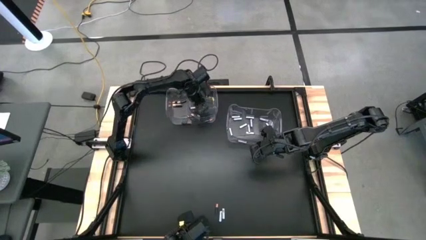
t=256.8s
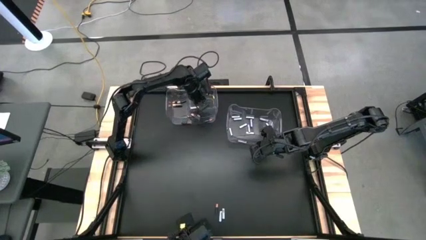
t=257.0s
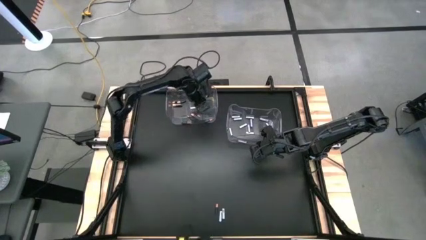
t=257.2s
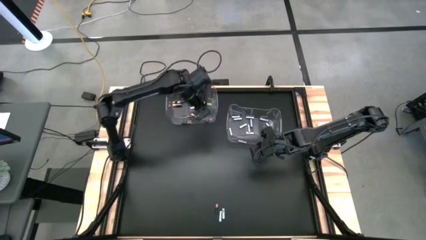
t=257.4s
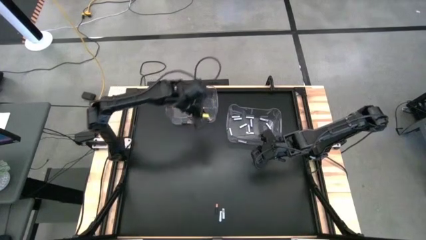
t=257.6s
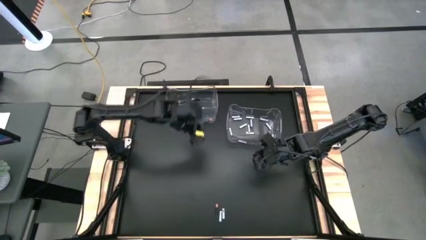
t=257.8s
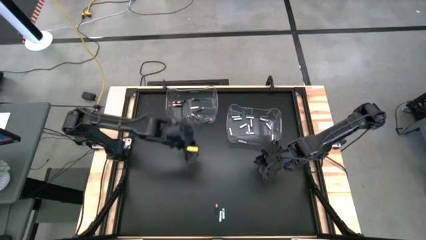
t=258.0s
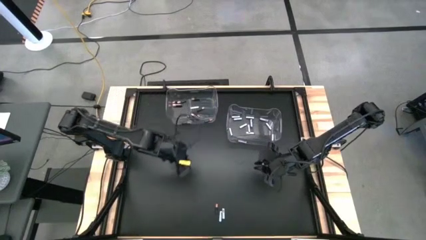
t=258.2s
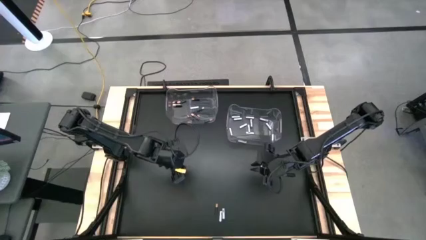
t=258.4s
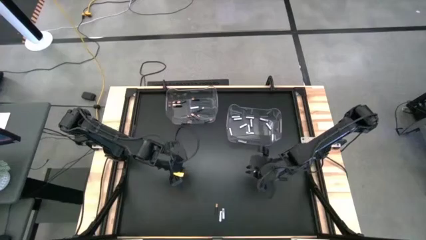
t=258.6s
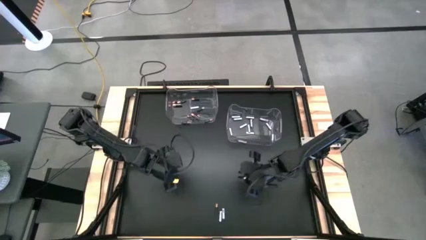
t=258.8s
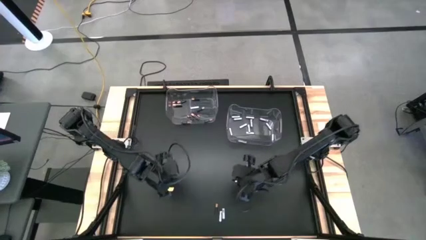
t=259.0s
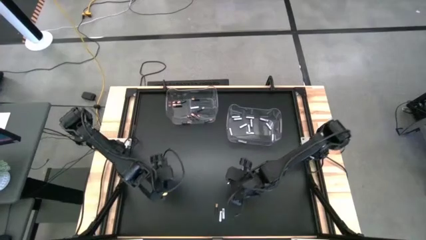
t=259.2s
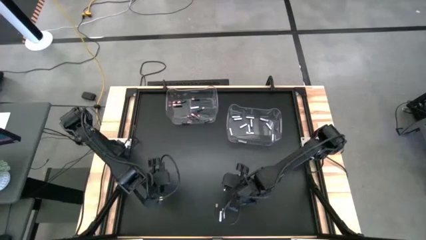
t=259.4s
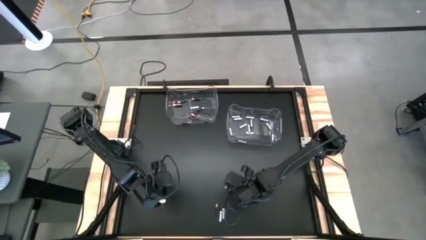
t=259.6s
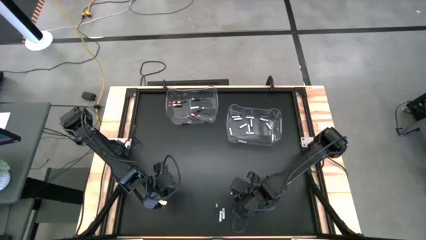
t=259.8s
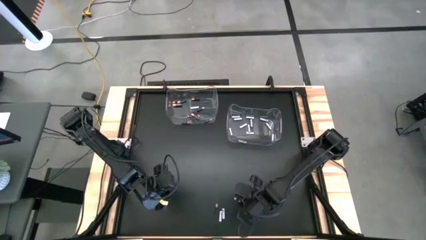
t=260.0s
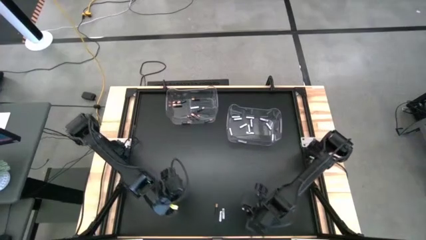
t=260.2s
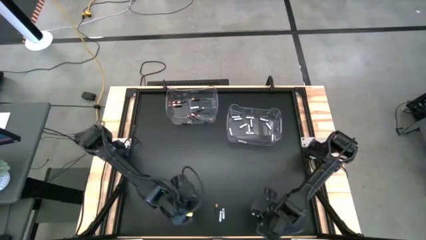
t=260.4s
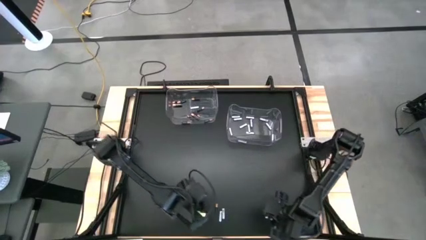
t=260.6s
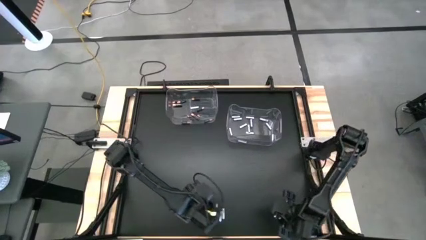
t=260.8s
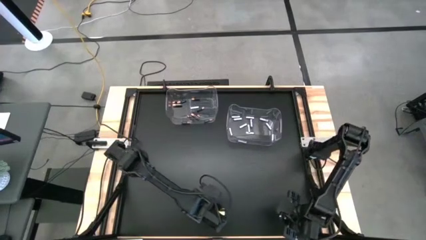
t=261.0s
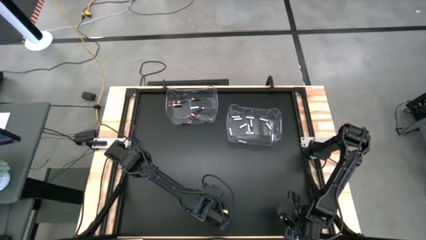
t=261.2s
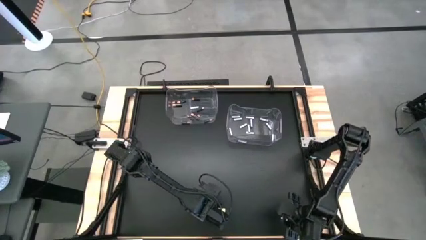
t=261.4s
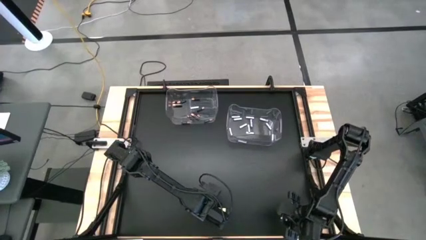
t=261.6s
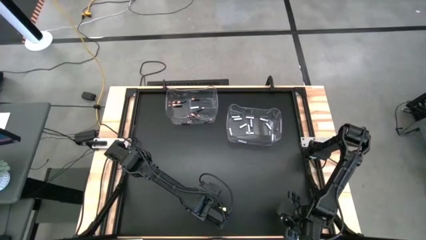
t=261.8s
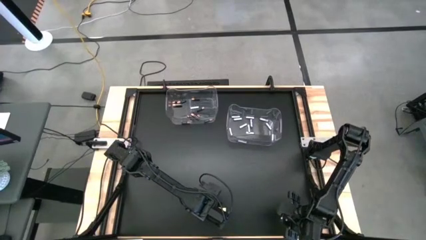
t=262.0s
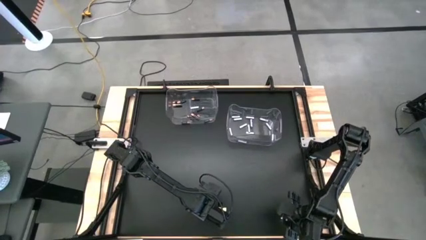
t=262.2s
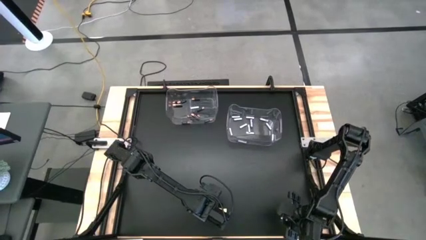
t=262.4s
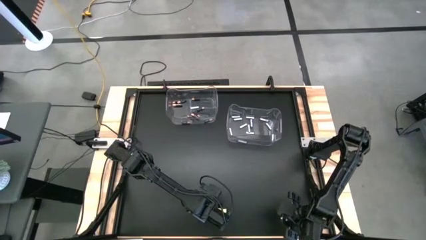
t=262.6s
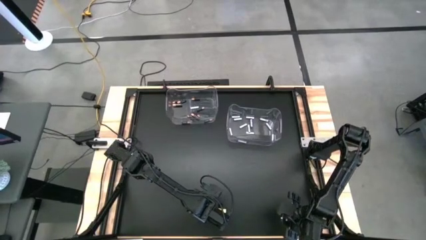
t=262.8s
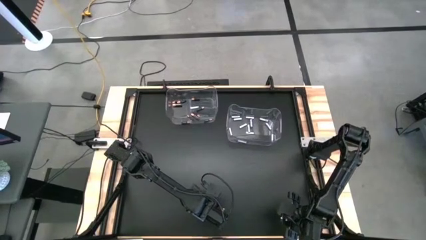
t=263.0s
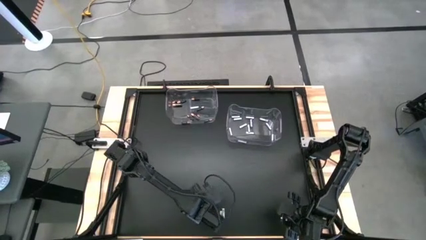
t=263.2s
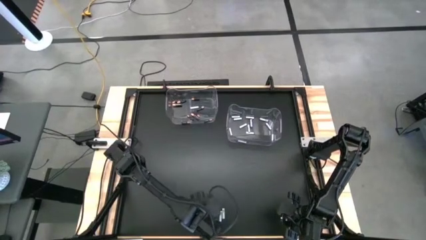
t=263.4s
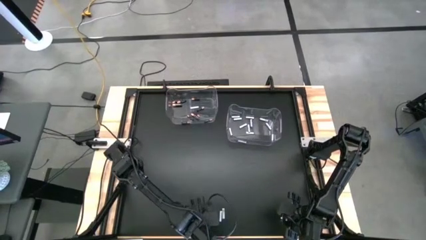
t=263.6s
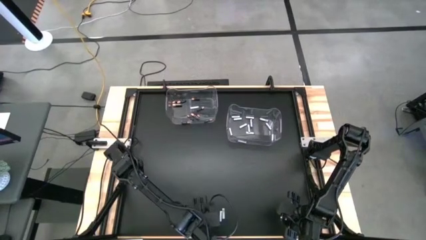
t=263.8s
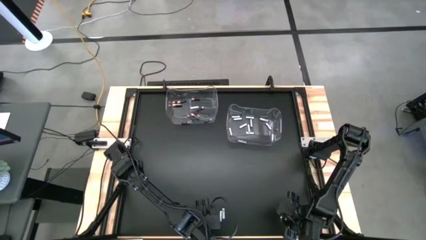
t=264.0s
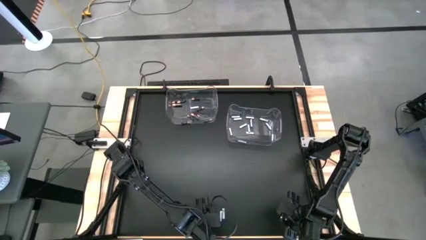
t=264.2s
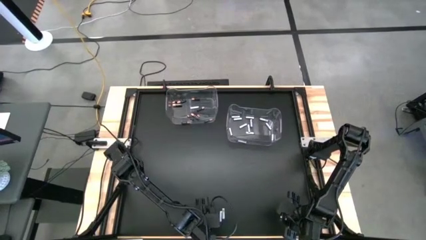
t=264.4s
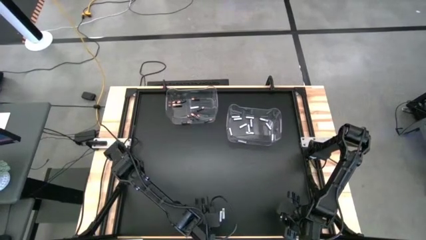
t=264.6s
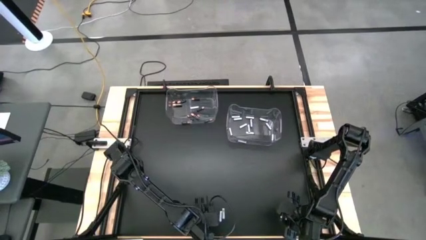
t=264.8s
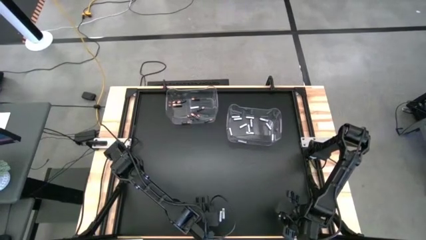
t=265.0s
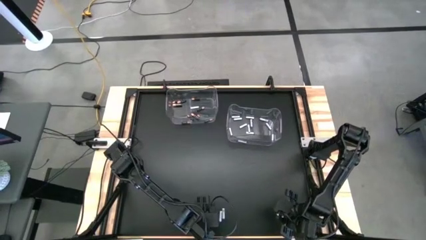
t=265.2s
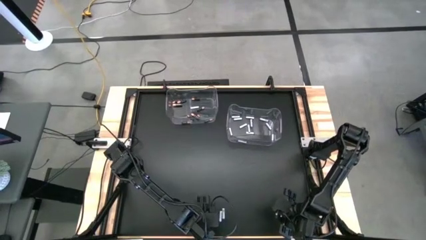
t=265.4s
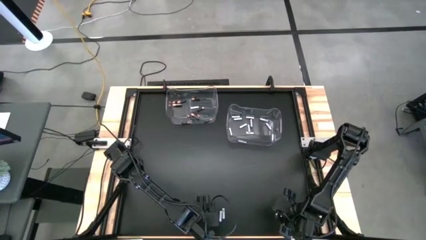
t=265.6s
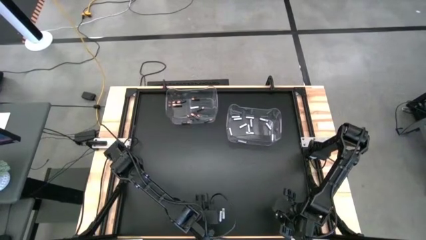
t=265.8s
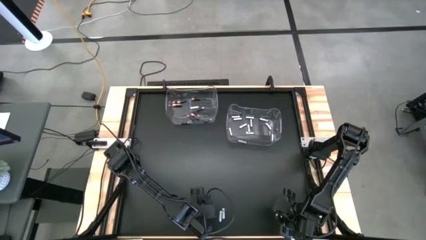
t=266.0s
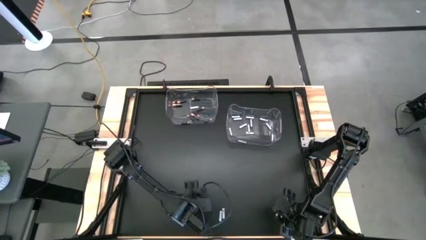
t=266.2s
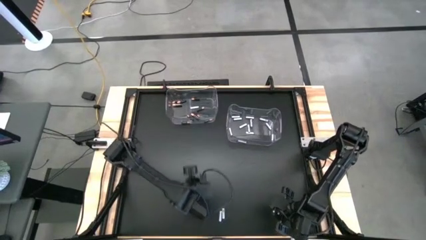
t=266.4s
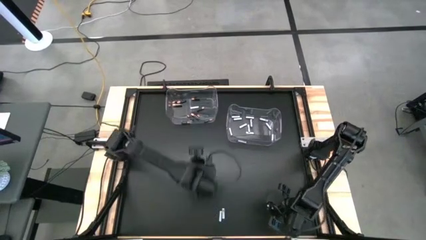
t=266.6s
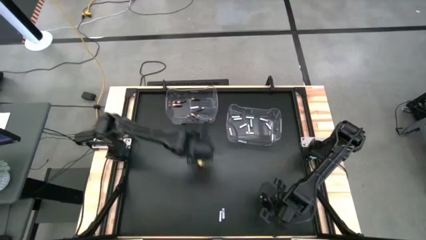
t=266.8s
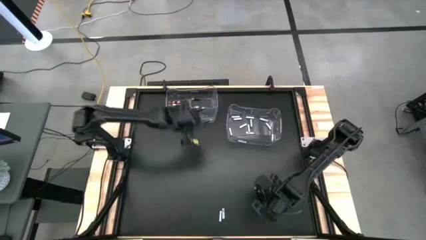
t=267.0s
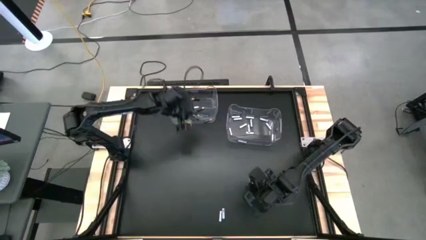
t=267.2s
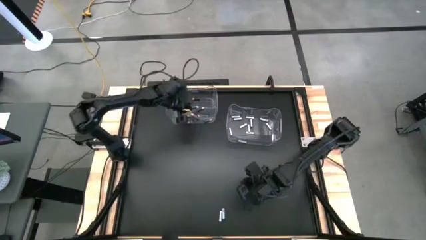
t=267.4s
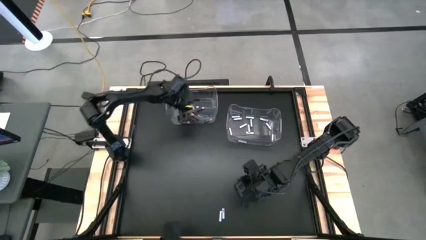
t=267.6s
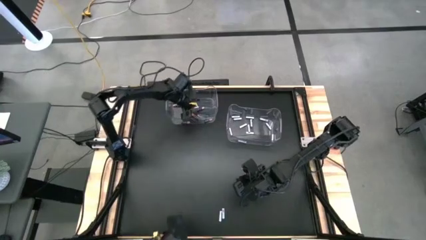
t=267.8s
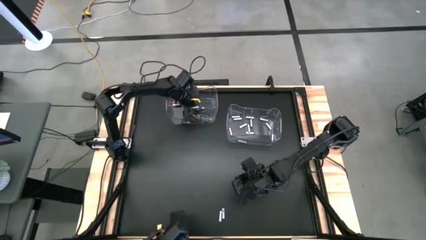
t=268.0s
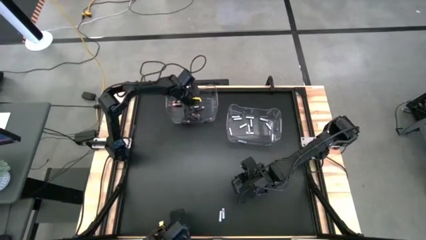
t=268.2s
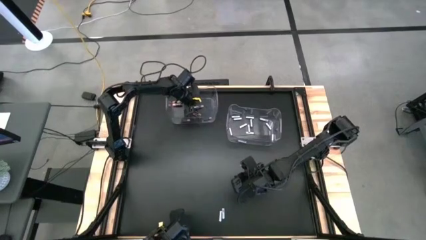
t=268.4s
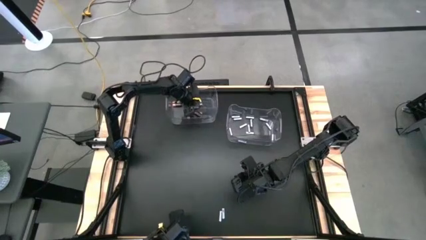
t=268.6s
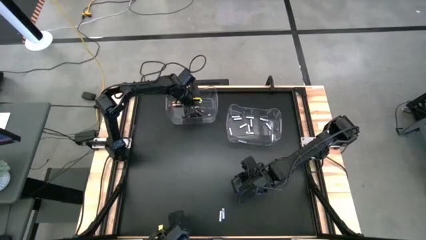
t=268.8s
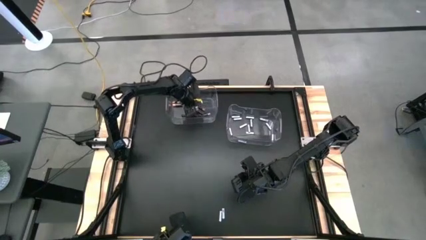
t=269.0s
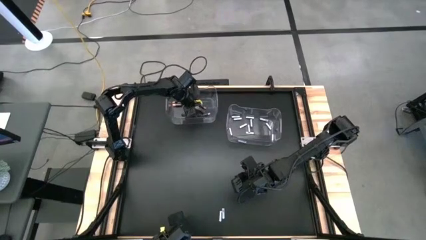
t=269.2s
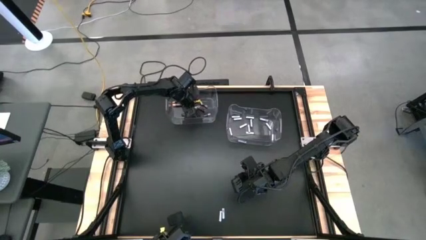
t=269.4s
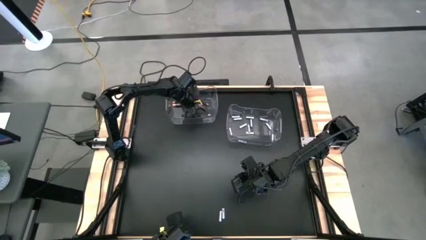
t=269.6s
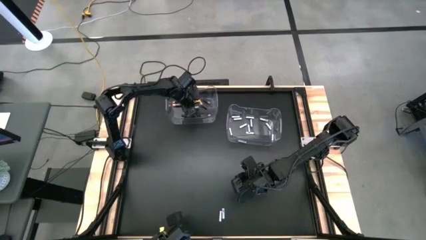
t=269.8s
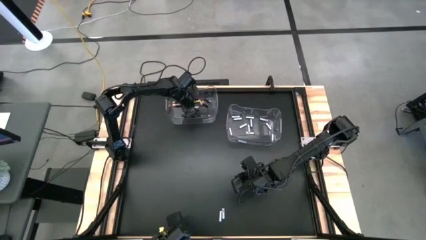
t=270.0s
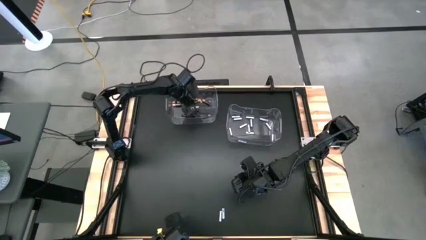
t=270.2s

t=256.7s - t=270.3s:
Task: Sort batteries
Put the black battery into the left transparent bin

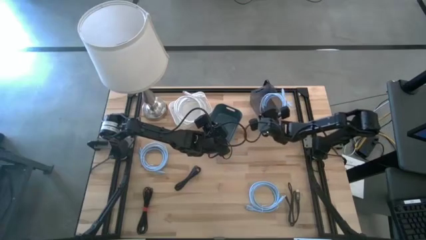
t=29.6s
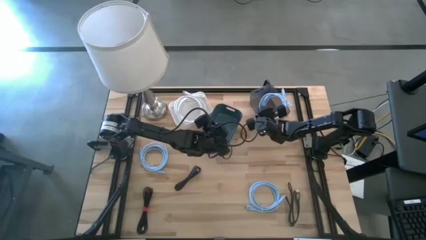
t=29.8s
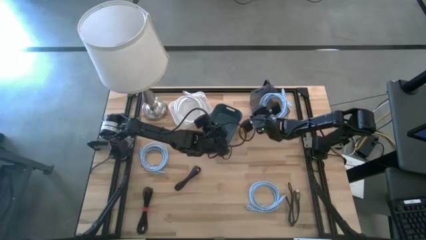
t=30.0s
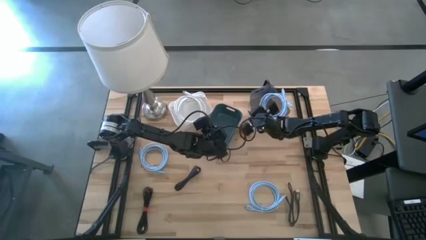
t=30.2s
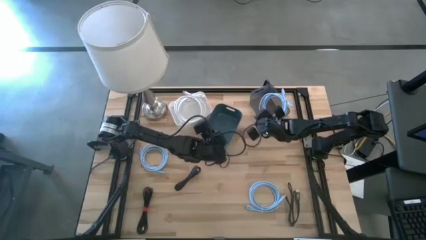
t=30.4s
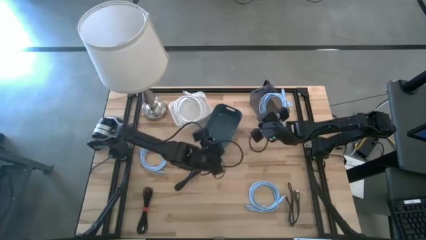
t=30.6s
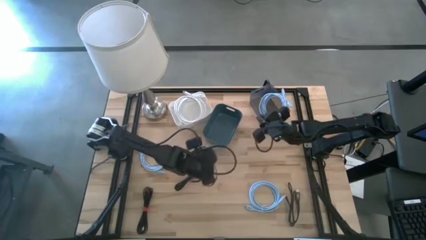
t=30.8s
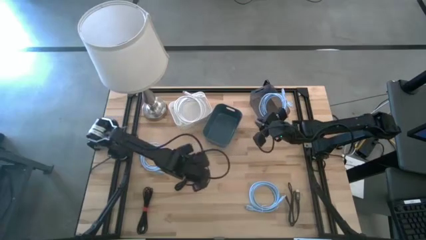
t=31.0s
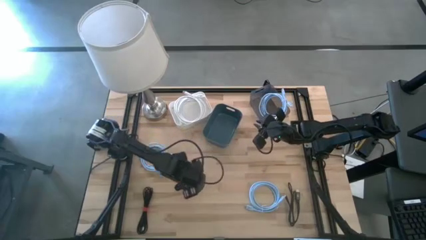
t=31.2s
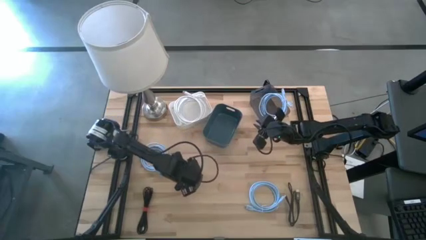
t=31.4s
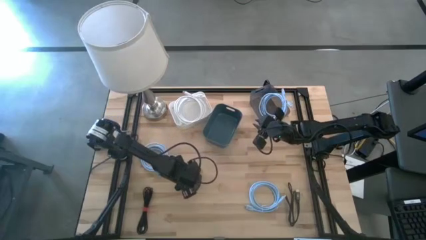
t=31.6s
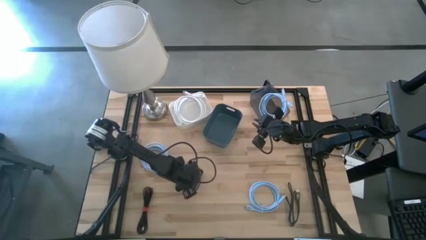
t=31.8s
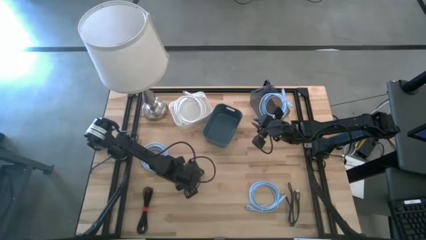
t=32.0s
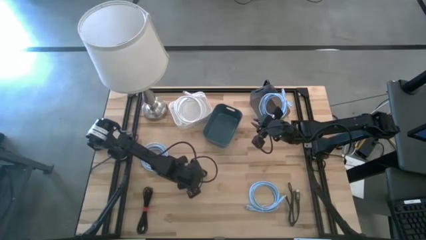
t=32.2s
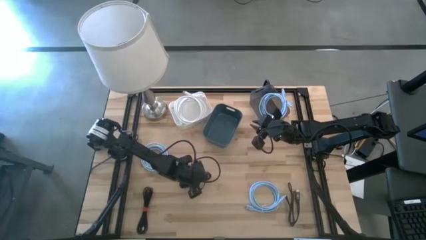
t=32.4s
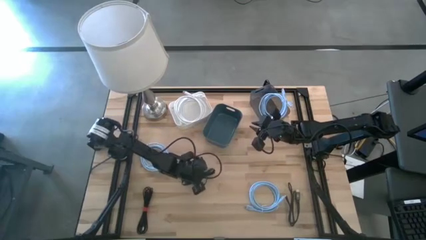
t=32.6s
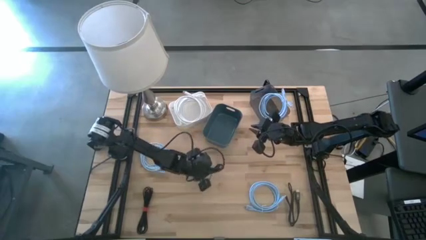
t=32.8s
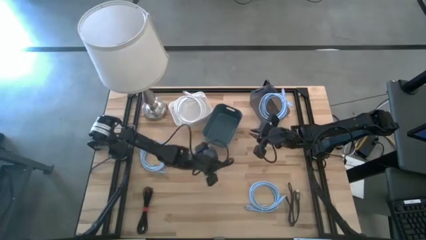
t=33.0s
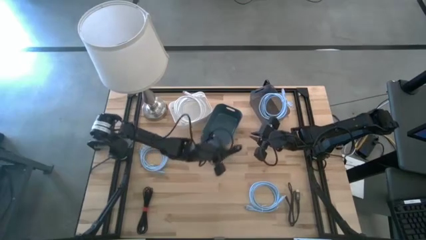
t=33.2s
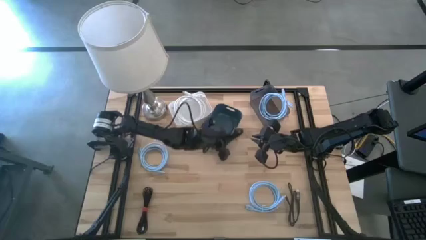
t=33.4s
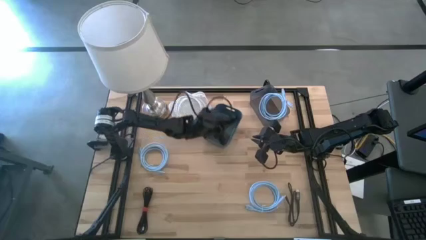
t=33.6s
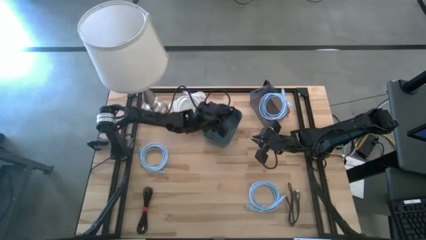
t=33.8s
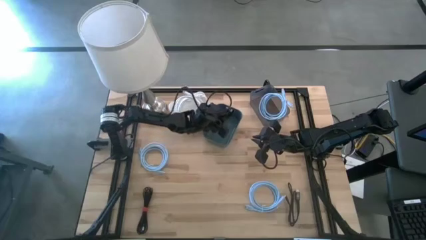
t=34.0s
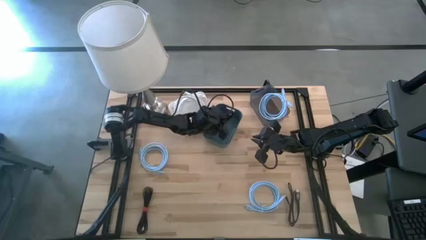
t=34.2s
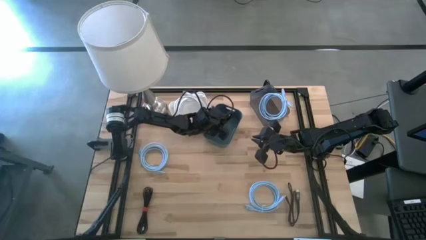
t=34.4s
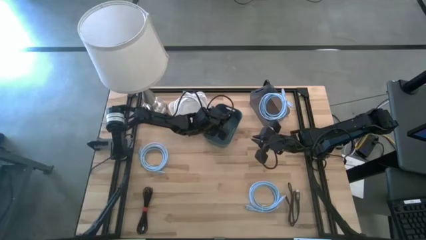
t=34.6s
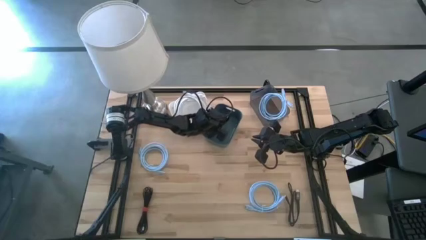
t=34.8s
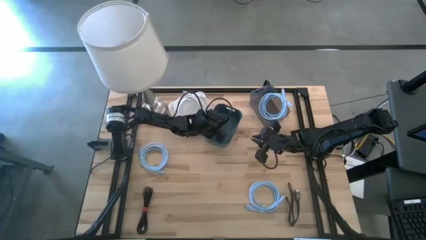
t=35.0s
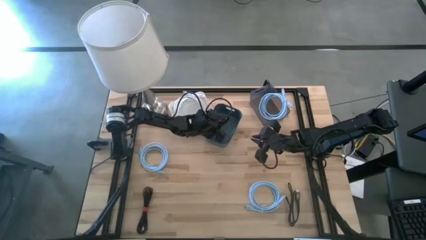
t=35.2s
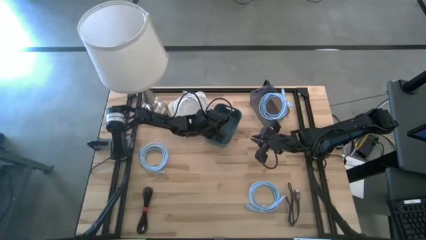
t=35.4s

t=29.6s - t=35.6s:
Task: Sort HDMI cables
Put the middle black HDMI cable into the blue bin
